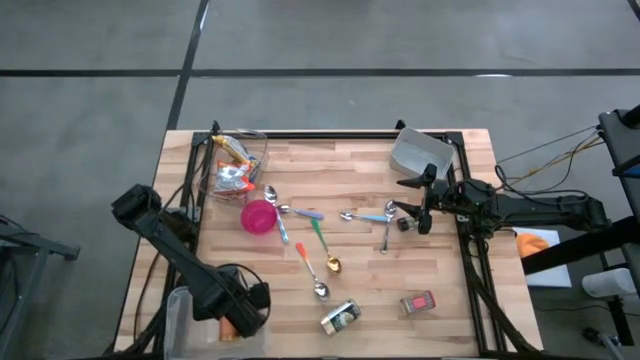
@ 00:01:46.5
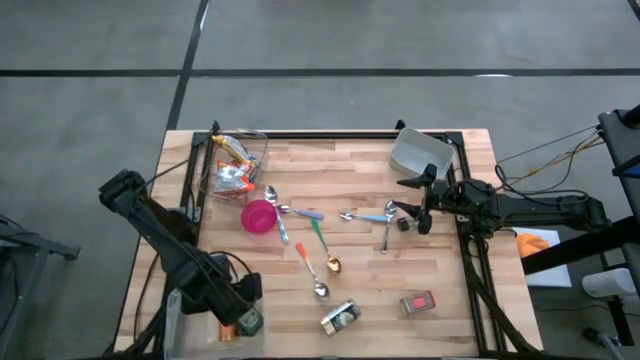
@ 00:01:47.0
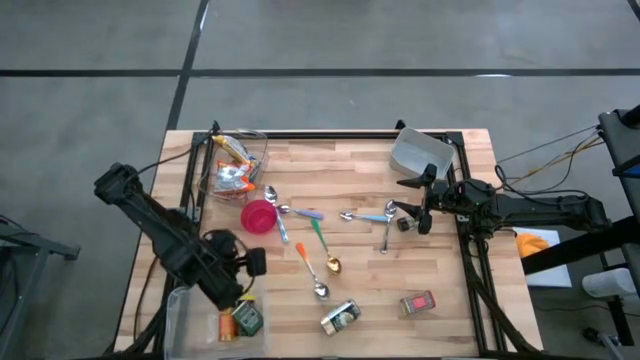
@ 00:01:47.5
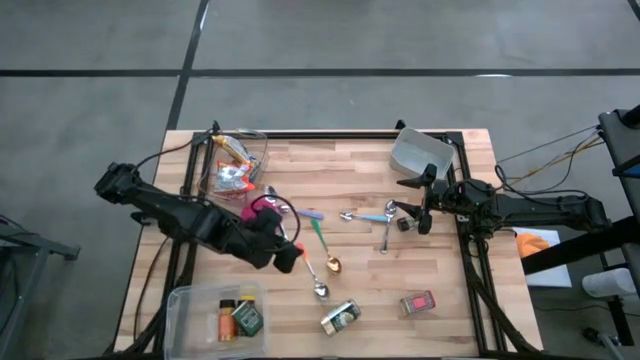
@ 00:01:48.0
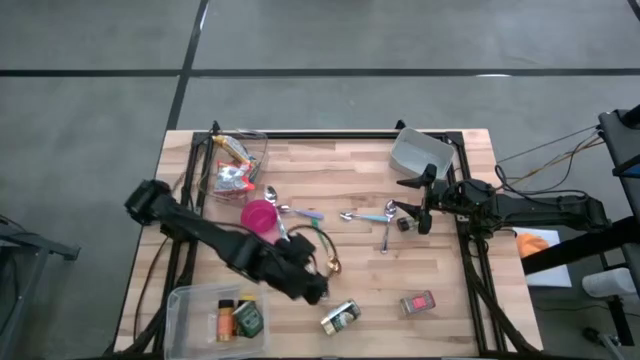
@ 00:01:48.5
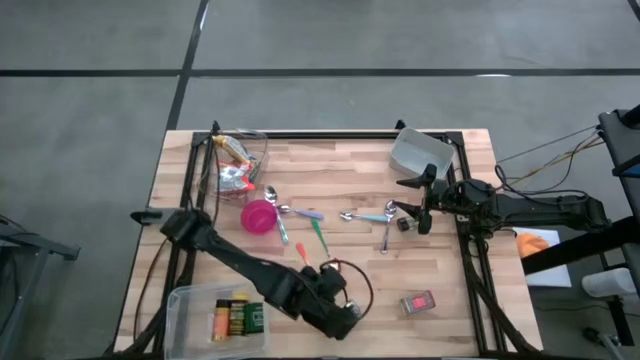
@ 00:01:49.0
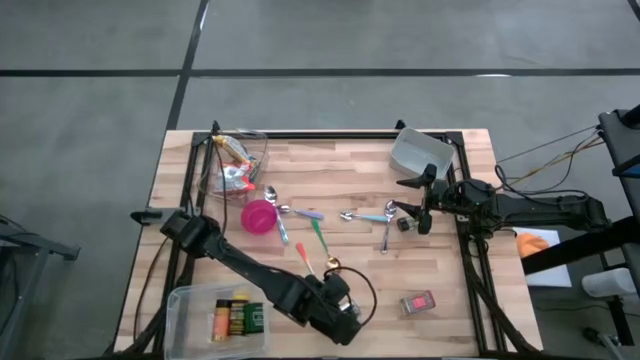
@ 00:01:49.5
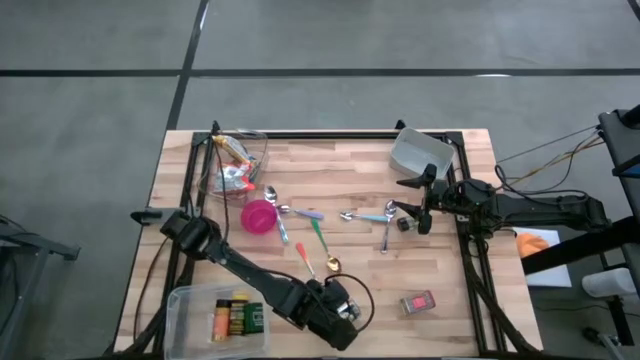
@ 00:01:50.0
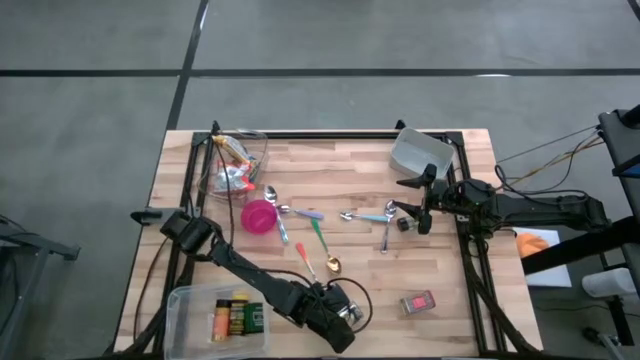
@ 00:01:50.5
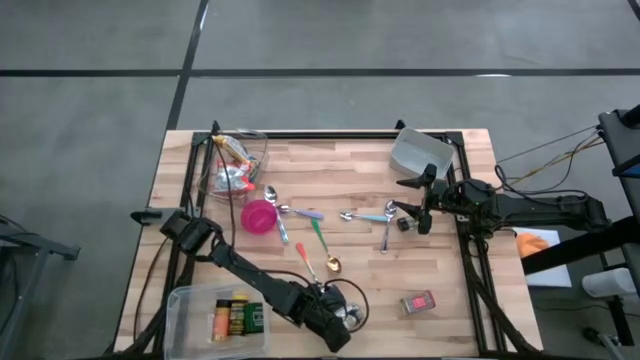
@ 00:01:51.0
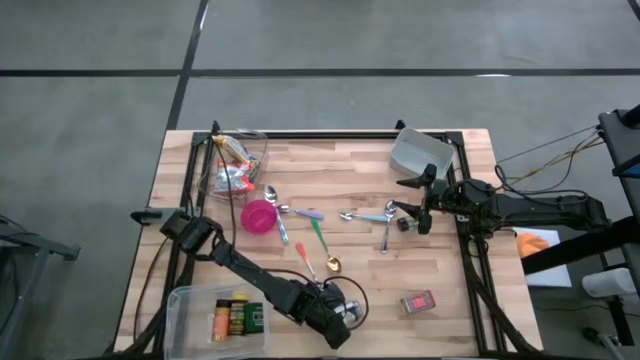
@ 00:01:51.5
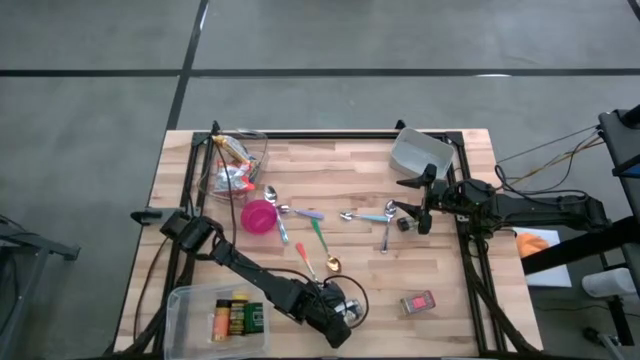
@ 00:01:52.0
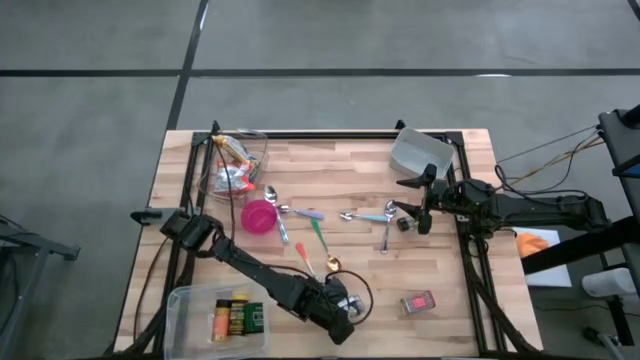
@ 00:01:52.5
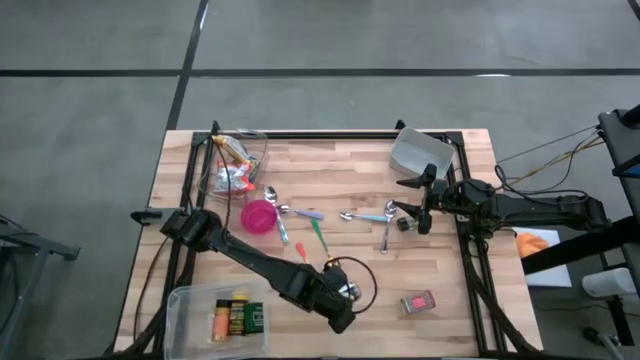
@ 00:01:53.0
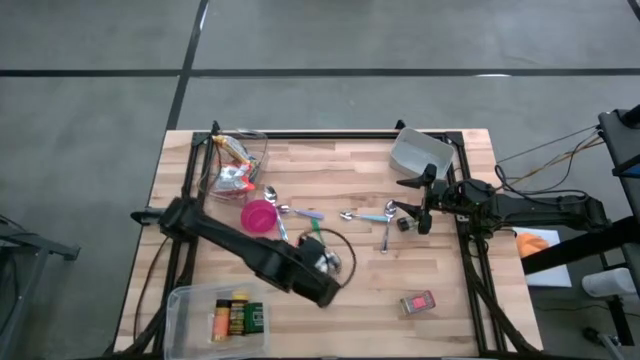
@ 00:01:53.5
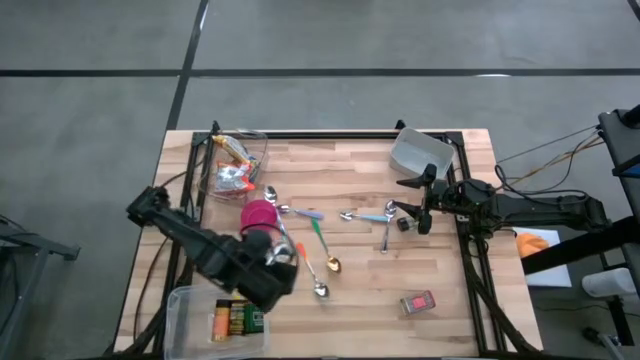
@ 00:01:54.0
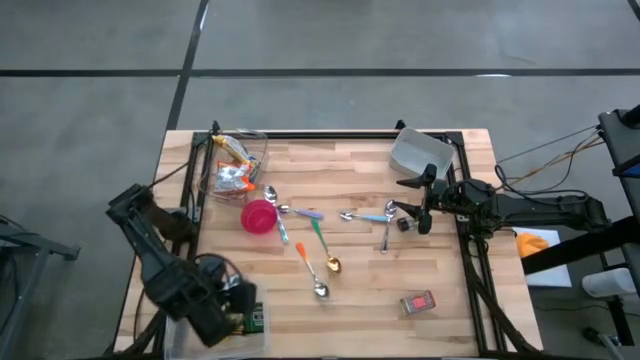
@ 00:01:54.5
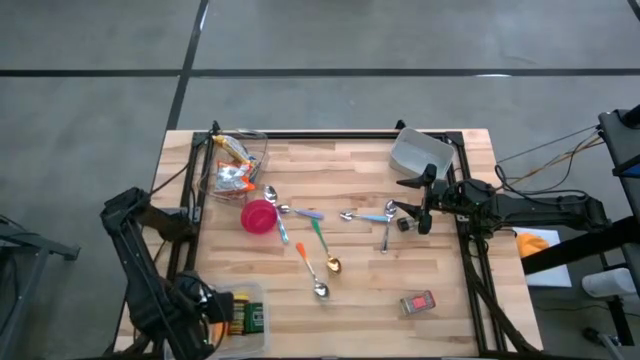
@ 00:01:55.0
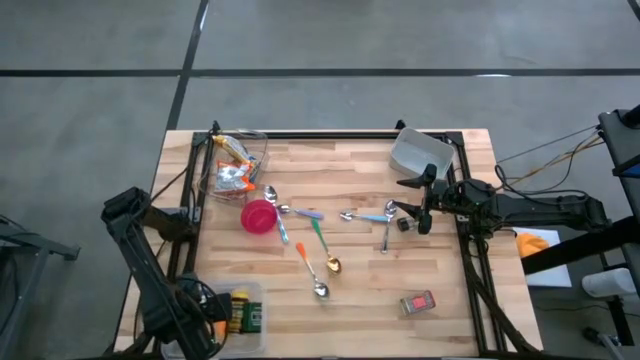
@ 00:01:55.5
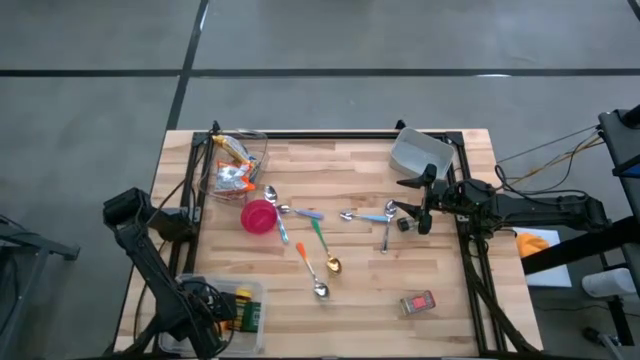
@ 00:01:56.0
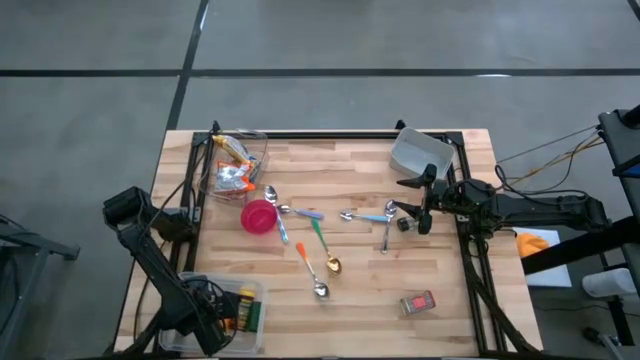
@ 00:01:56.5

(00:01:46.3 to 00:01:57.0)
Put the golden seasoning bottle into the white bin
